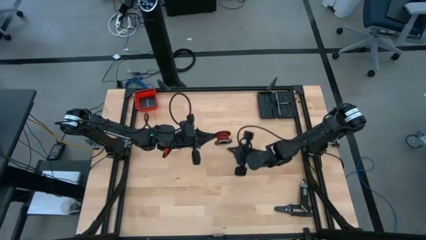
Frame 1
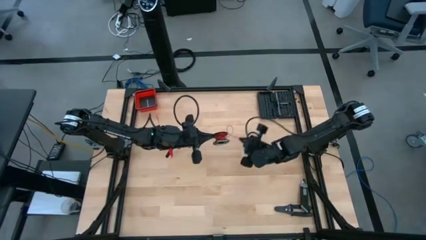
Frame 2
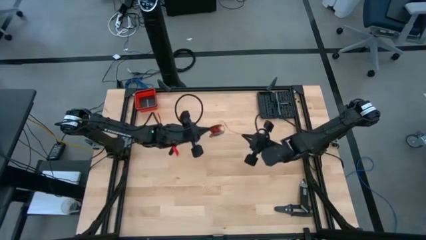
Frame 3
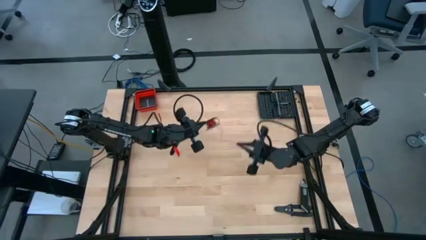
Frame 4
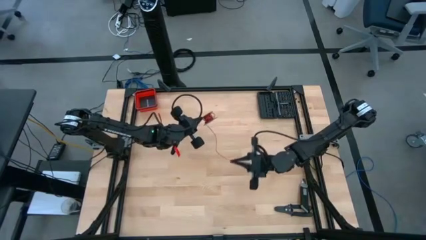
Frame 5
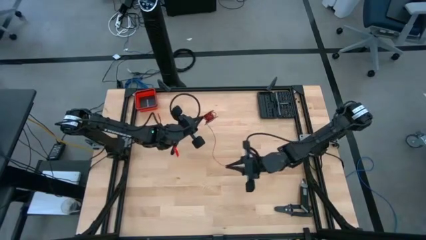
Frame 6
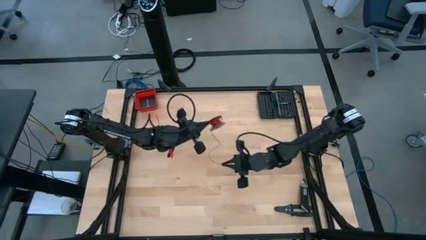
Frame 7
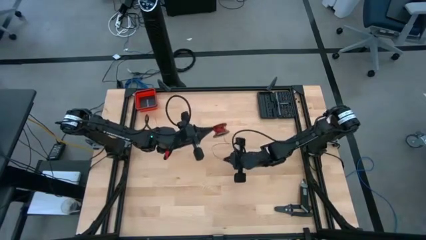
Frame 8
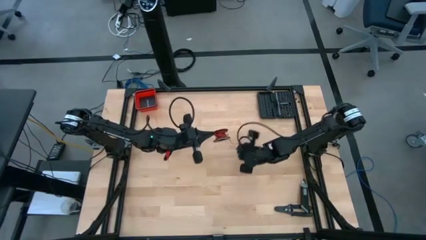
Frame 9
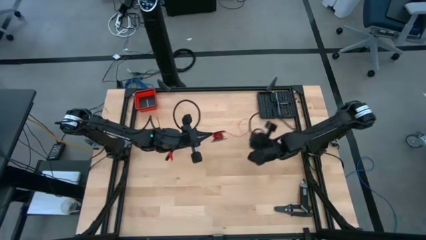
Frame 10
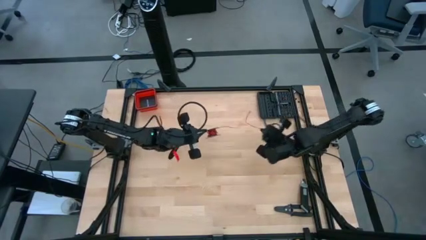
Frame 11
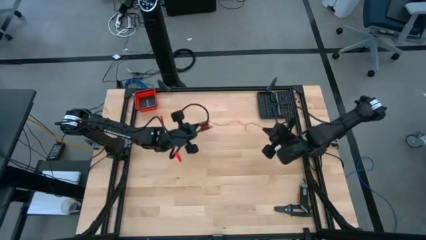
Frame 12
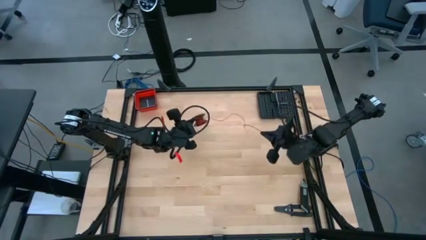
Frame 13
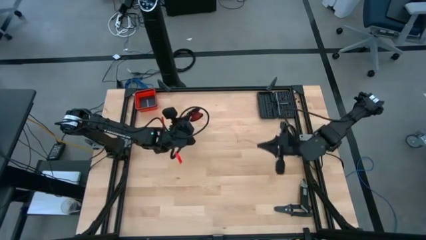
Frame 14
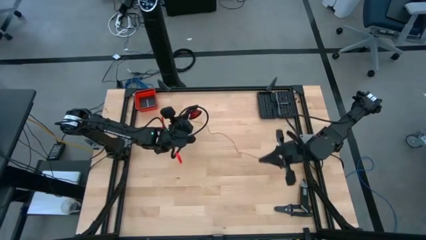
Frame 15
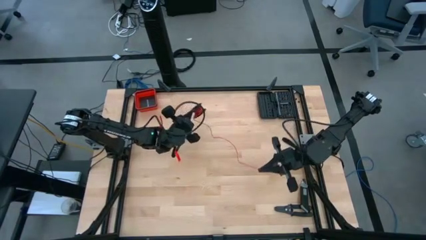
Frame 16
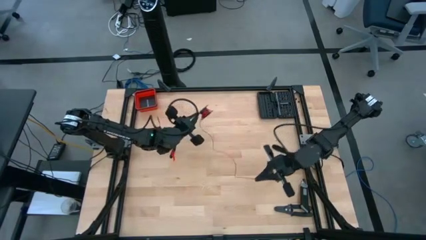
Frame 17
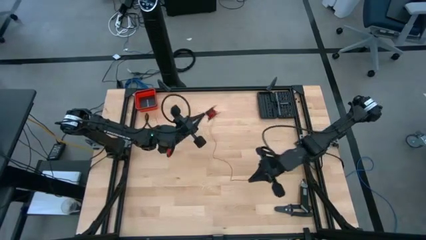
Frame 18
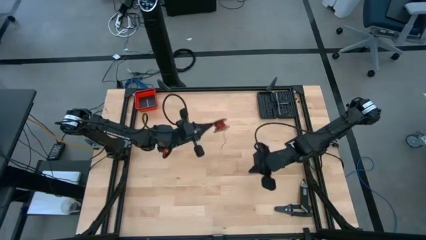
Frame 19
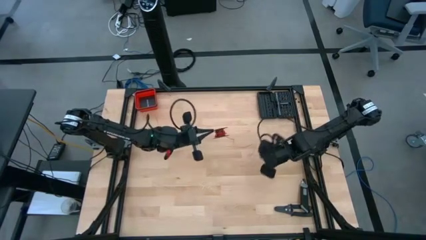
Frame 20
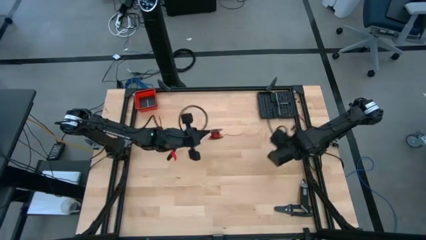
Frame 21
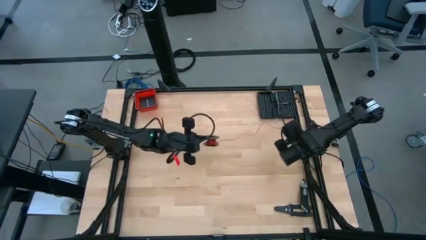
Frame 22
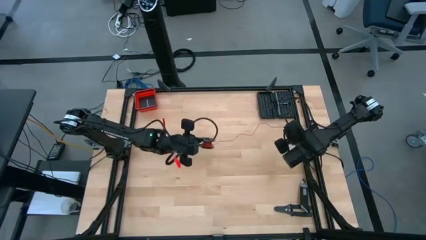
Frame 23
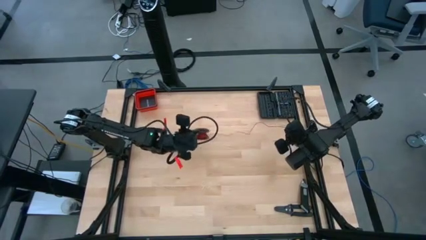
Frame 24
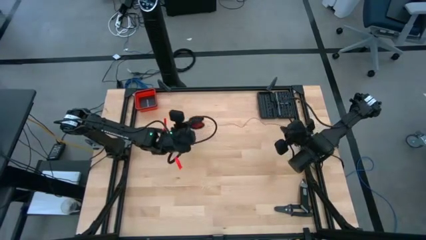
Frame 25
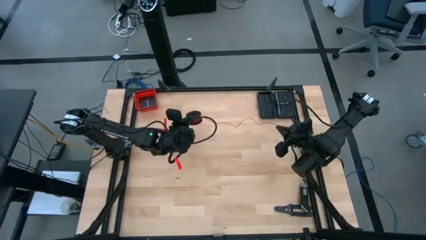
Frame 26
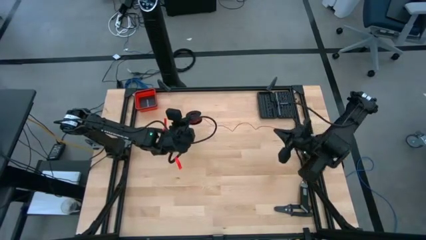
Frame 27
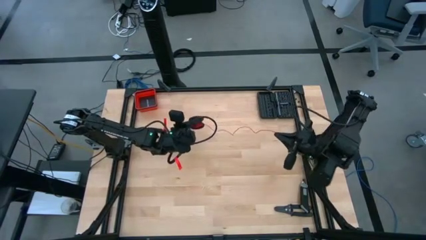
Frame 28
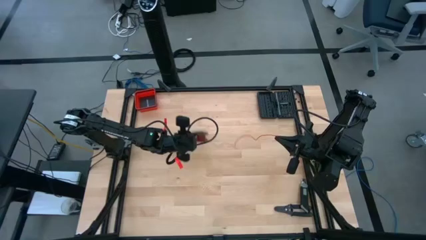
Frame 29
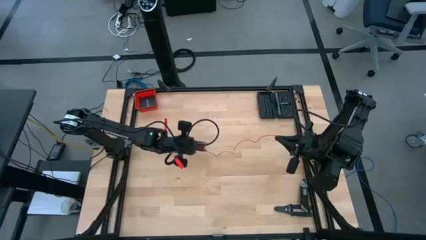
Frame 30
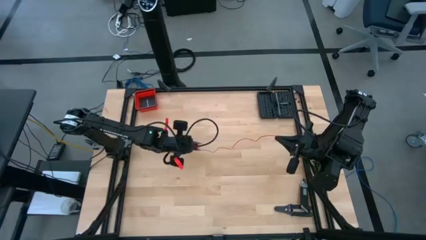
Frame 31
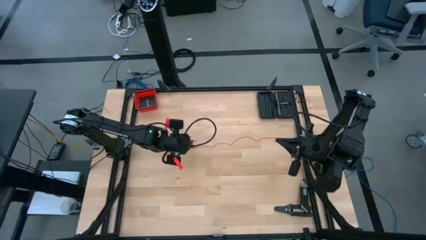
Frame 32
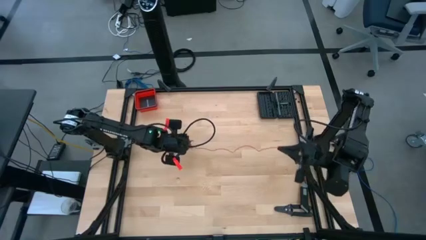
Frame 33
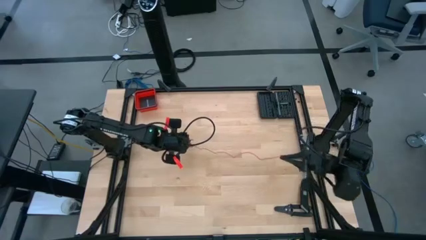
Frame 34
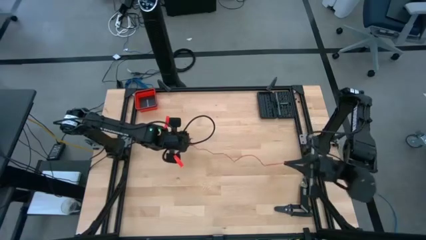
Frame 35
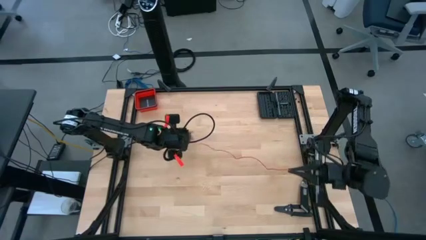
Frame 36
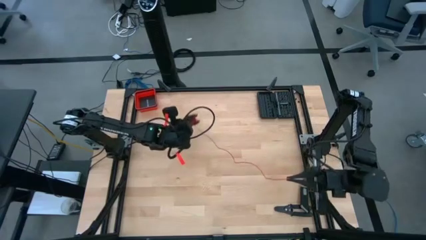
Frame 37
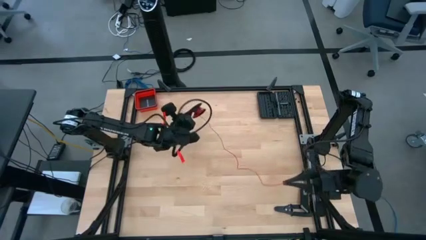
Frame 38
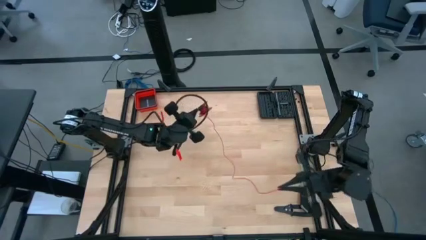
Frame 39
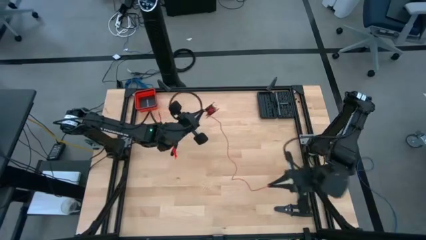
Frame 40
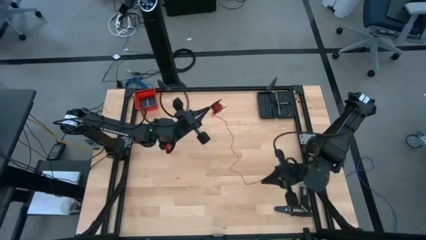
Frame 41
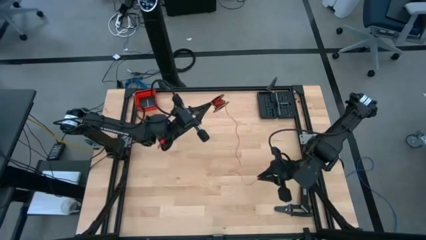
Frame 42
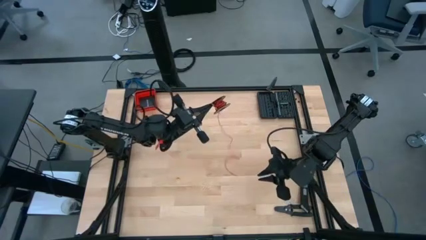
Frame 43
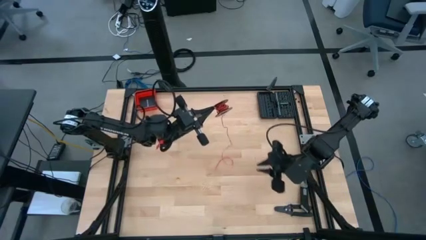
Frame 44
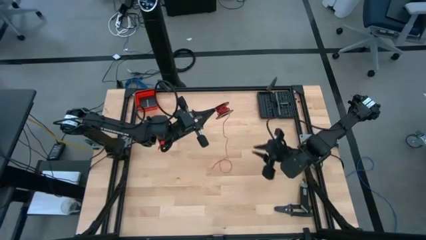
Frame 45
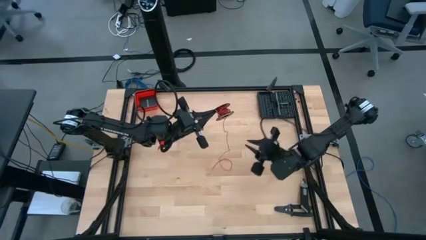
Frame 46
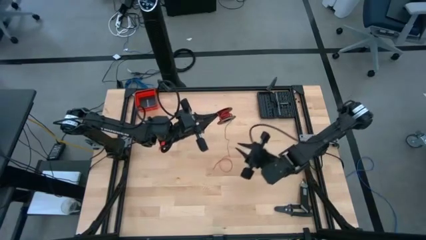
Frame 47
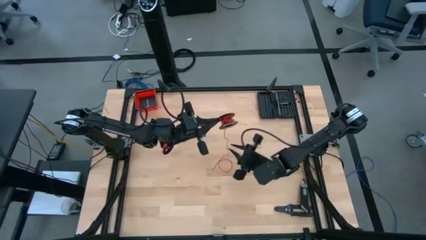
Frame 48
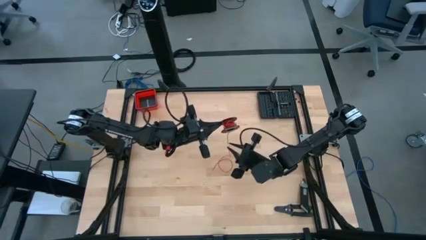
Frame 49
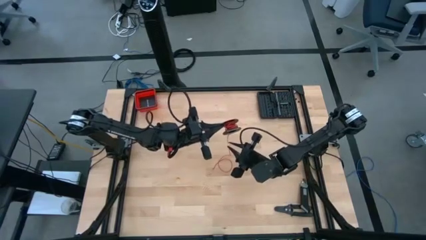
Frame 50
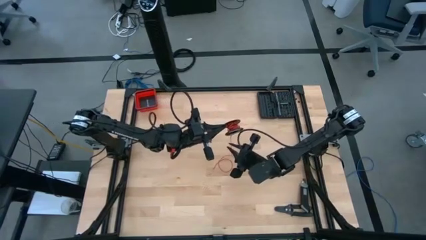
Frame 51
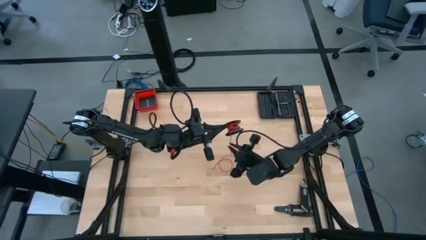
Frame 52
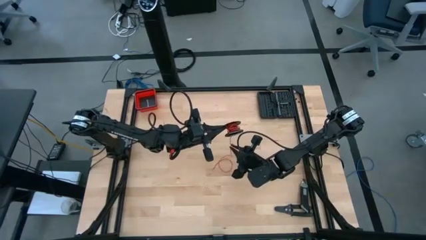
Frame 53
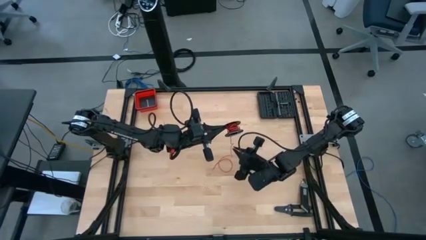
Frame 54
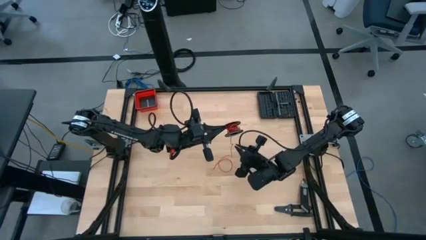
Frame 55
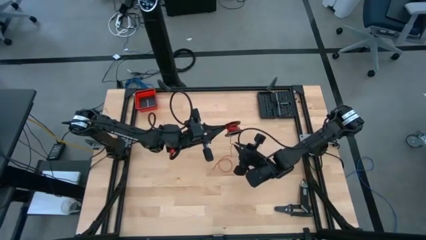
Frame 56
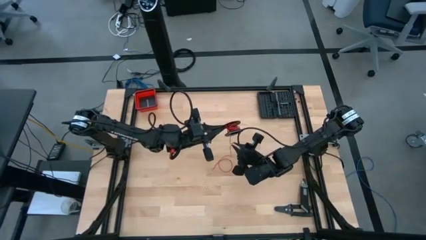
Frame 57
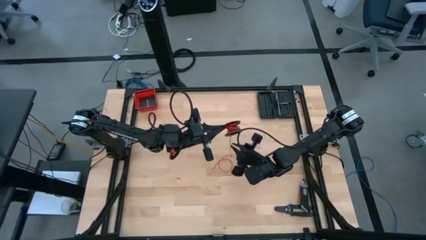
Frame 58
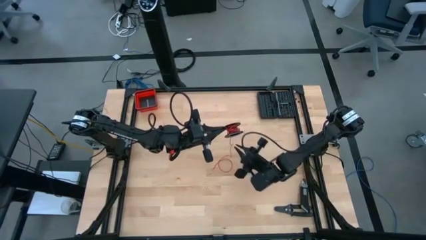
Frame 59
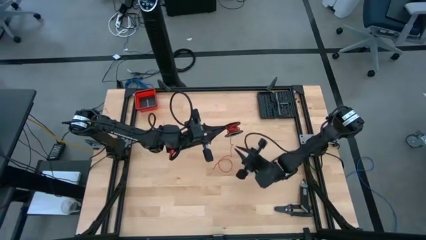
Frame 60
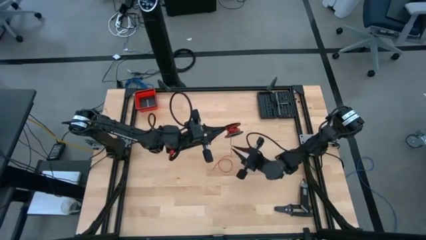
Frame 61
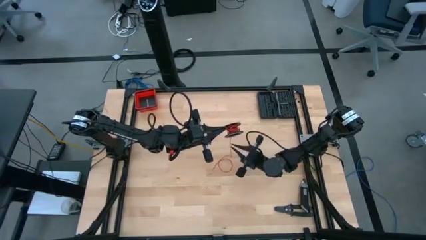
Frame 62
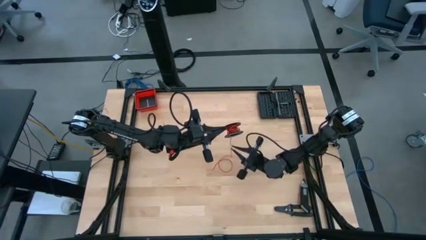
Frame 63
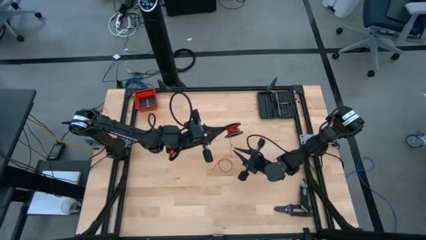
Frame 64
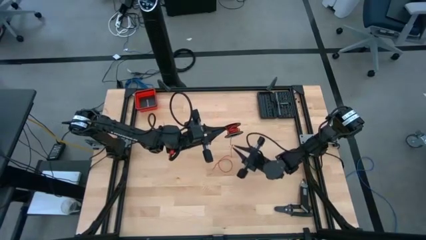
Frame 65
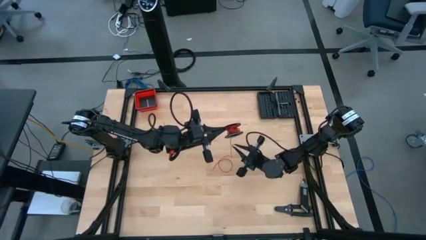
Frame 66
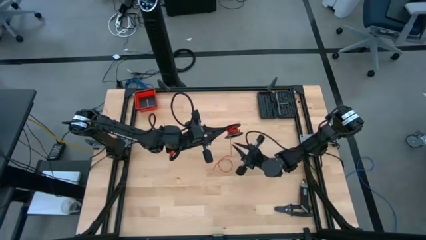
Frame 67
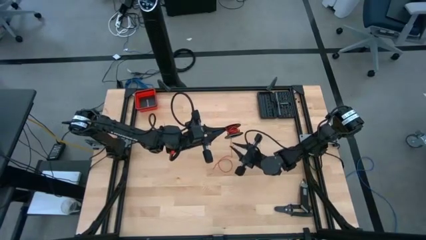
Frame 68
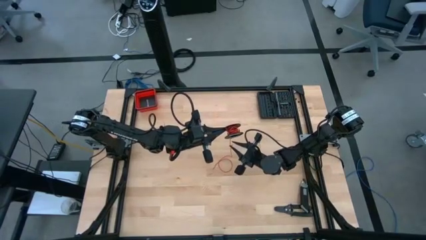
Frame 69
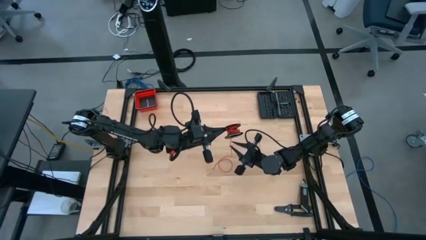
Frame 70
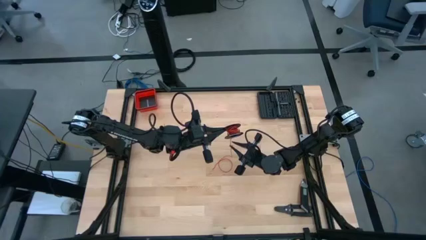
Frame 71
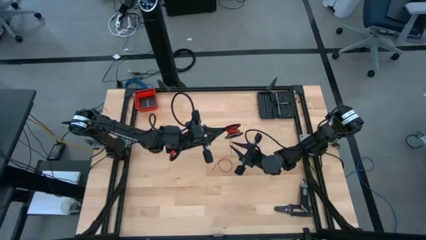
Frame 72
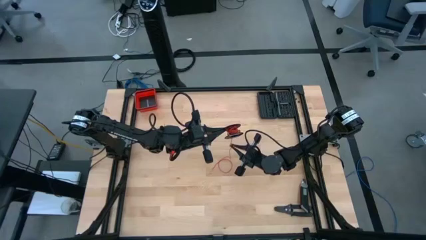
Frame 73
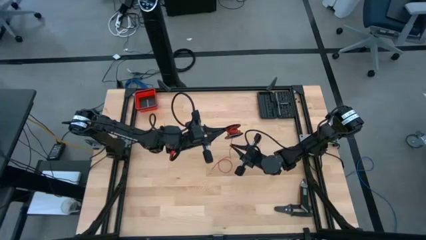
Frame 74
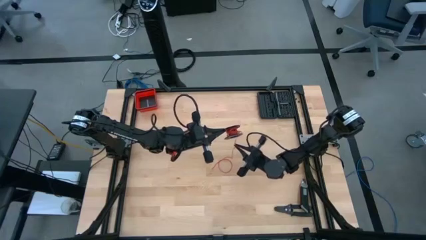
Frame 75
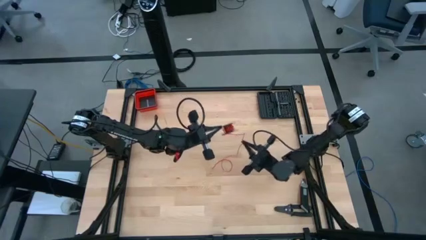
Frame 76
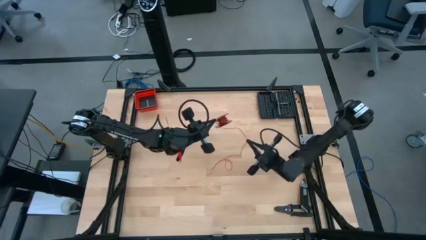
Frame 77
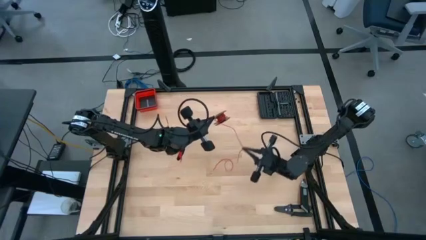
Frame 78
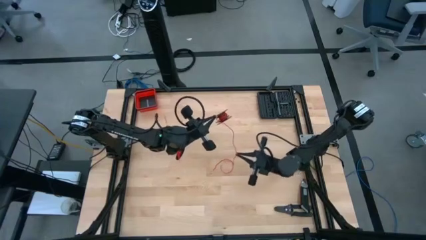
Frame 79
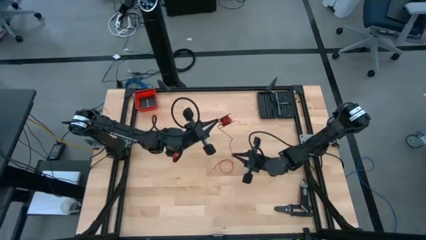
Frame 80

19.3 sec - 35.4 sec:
Task: Coil cords
Uncoil the red wire from the spool
